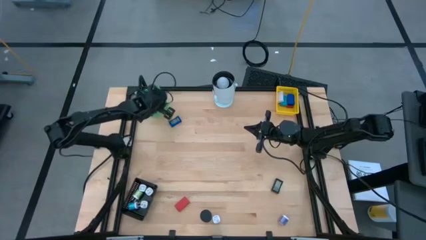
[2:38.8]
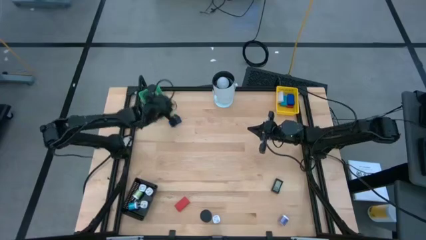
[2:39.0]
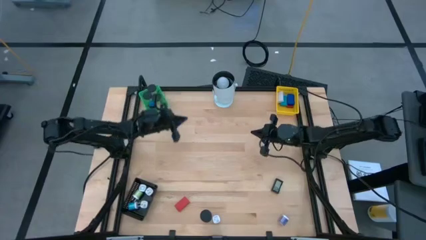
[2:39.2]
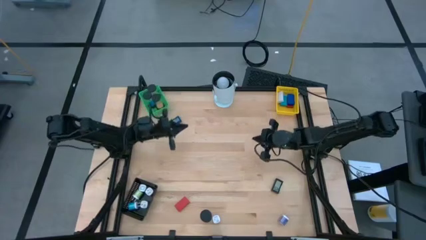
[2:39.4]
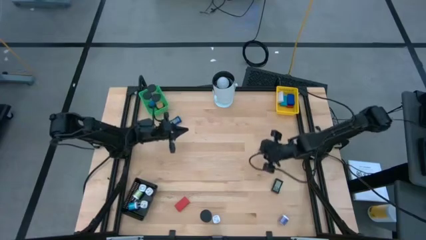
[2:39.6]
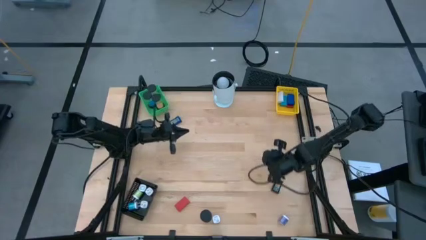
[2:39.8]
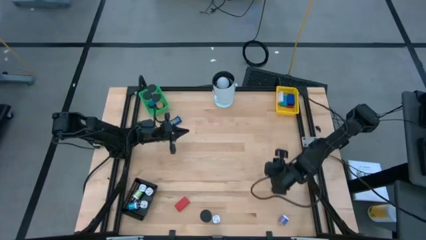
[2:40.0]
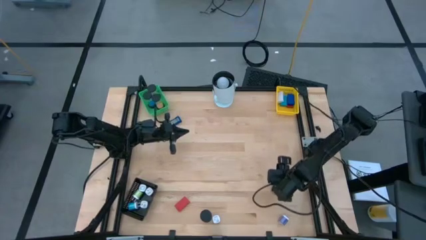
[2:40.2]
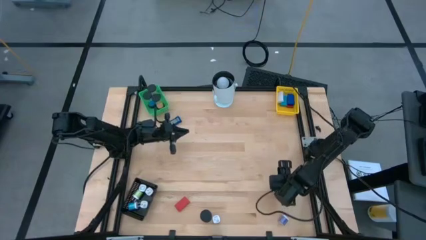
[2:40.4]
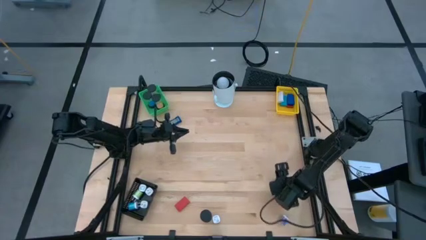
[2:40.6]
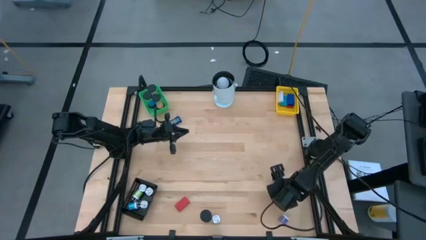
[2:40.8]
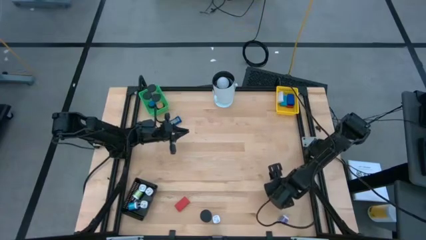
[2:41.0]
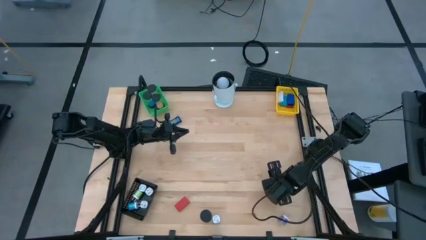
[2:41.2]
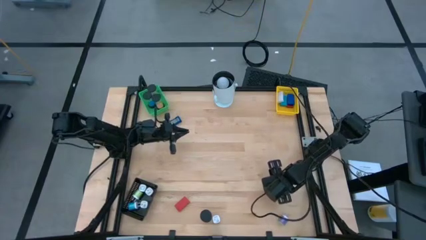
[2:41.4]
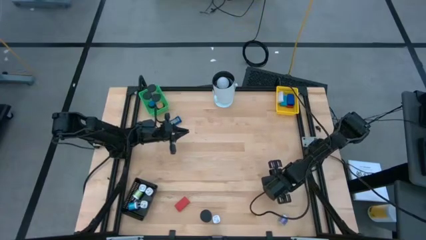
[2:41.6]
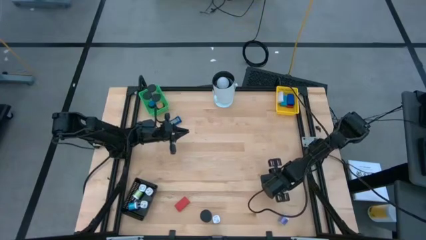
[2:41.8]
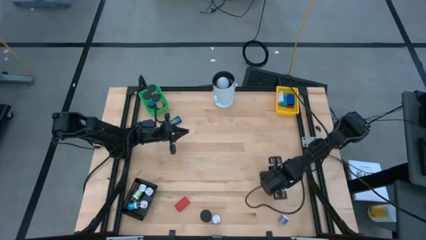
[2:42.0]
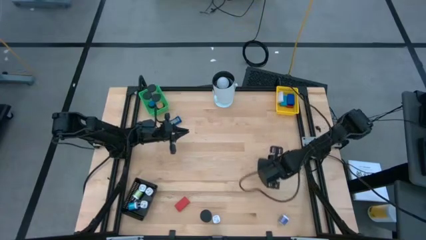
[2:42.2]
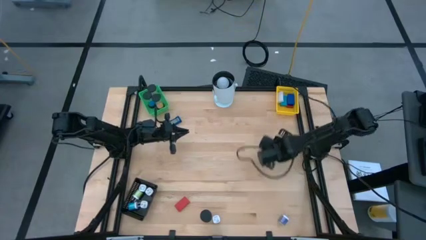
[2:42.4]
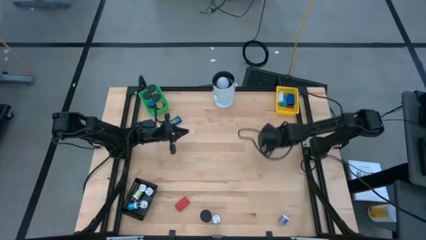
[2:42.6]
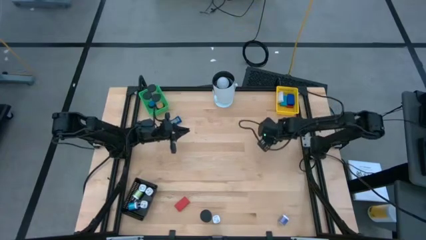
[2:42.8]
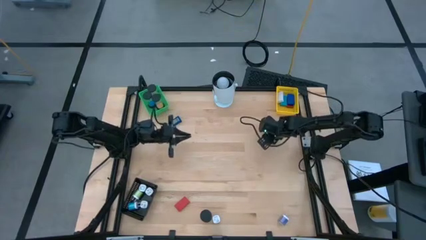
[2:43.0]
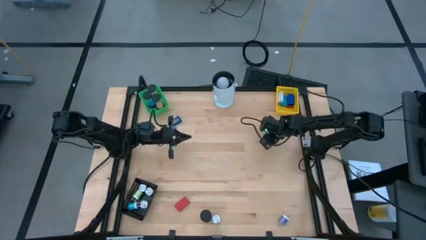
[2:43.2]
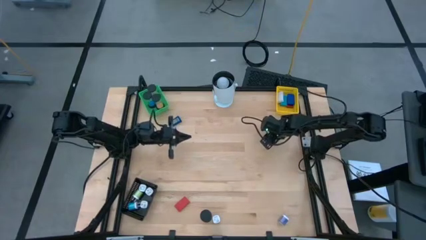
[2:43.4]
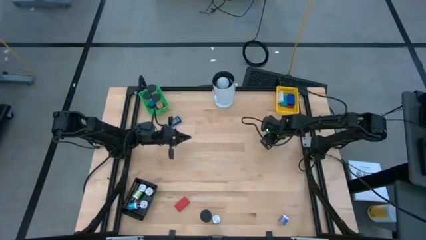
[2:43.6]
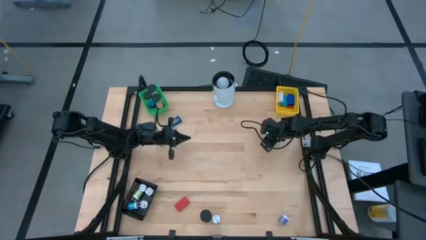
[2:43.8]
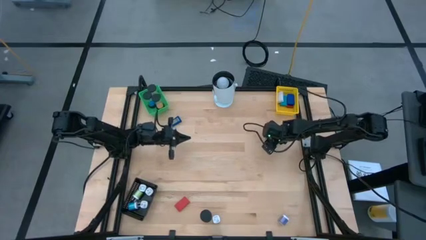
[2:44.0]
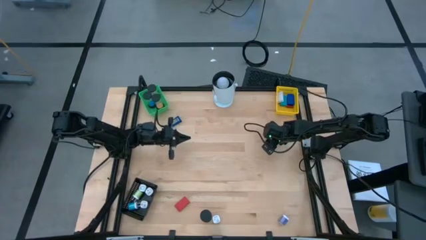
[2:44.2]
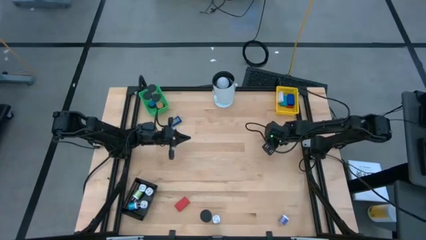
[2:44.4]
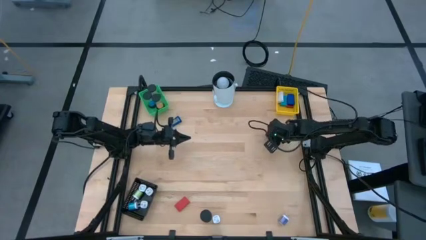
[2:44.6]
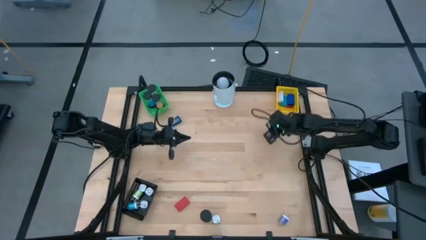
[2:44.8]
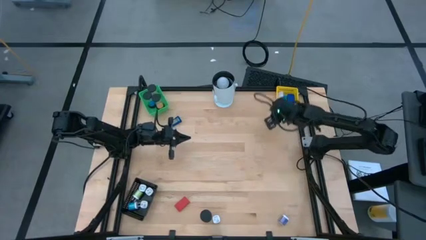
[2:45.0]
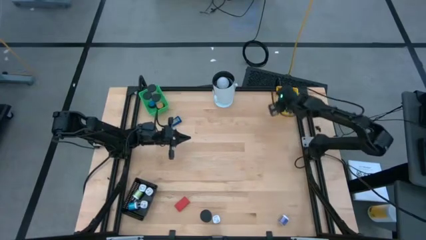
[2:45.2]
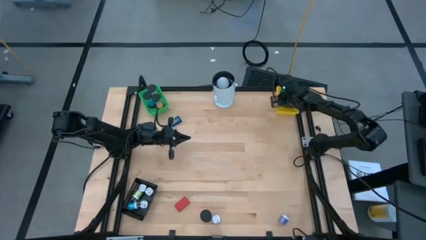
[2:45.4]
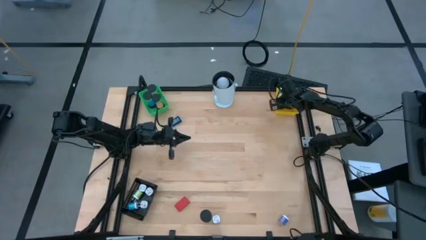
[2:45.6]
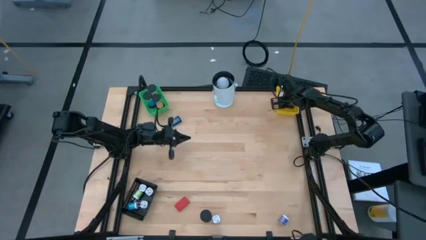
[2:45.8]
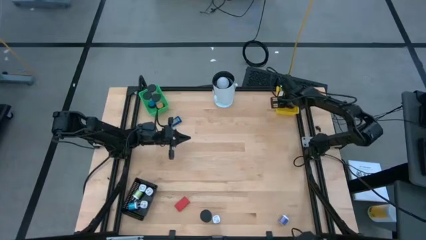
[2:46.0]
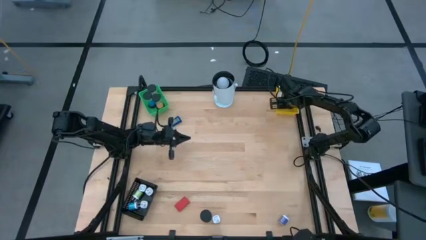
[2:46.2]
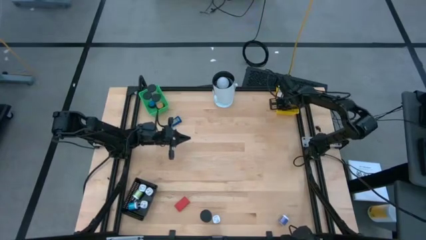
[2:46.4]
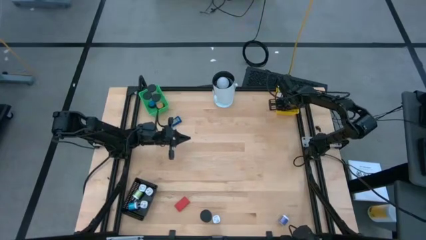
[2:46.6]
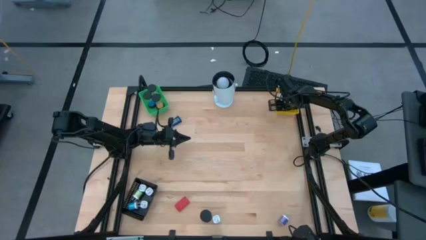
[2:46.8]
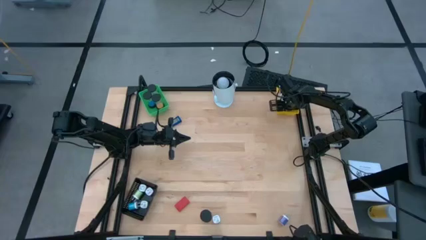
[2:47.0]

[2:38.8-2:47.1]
Task: Pick & Place Office items
Put the black digital clock into the yellow bin

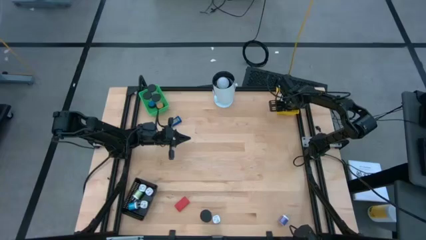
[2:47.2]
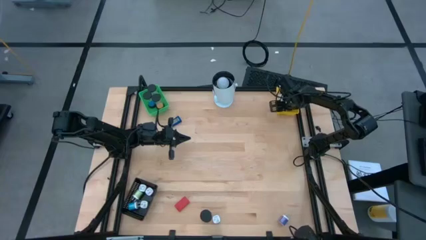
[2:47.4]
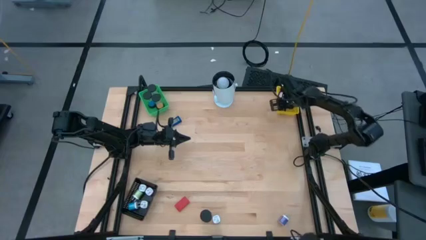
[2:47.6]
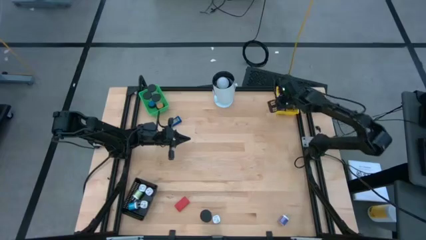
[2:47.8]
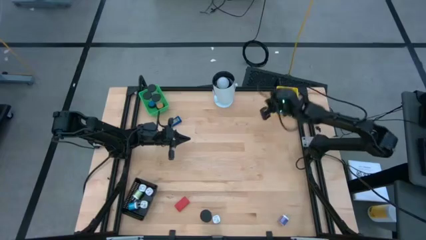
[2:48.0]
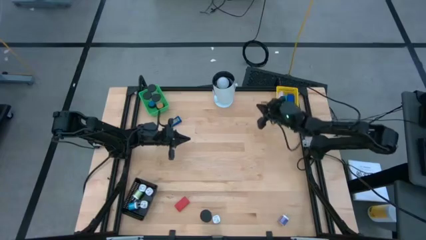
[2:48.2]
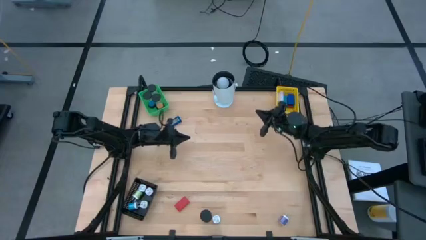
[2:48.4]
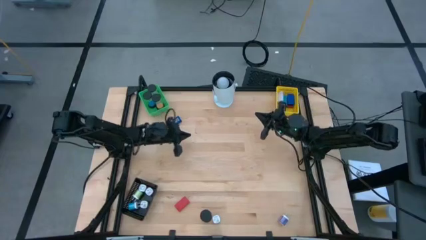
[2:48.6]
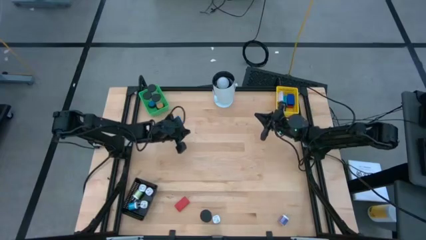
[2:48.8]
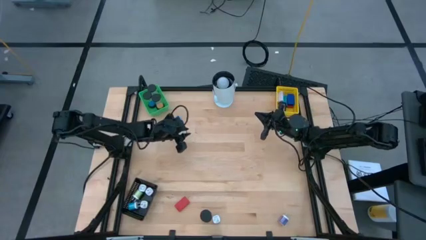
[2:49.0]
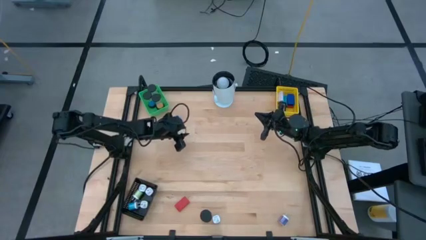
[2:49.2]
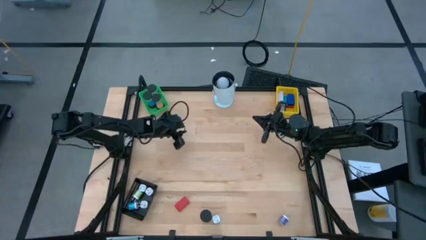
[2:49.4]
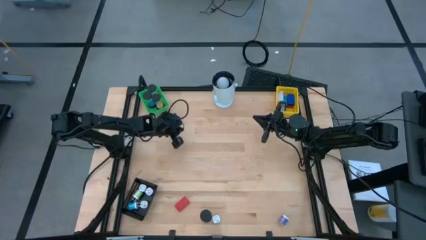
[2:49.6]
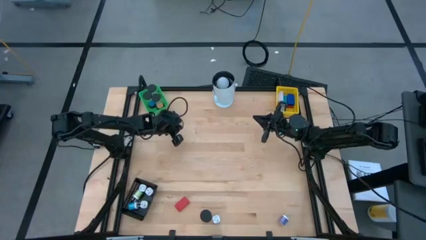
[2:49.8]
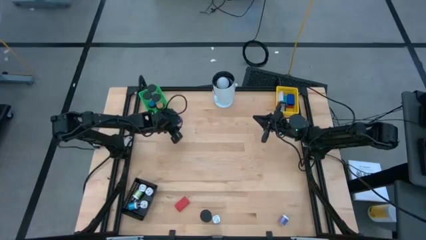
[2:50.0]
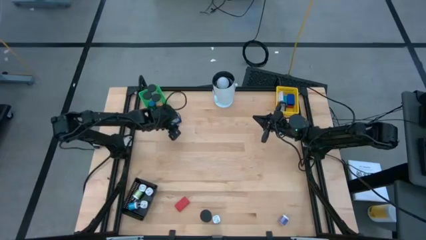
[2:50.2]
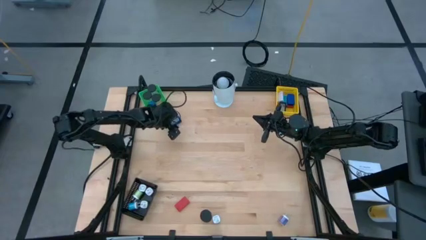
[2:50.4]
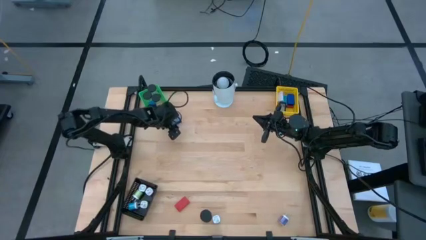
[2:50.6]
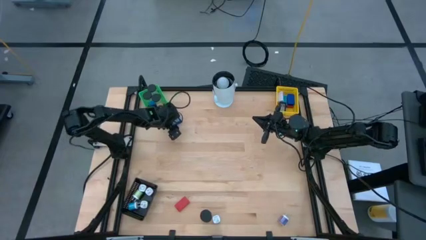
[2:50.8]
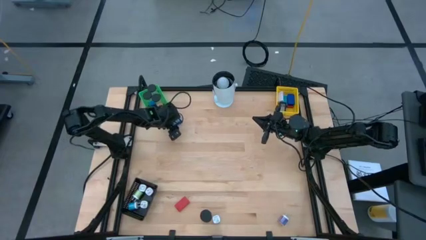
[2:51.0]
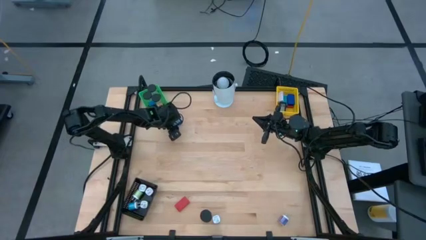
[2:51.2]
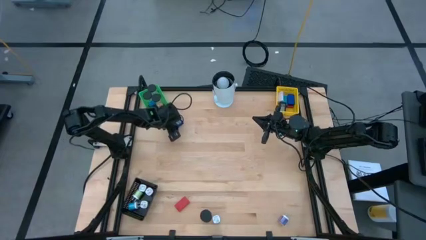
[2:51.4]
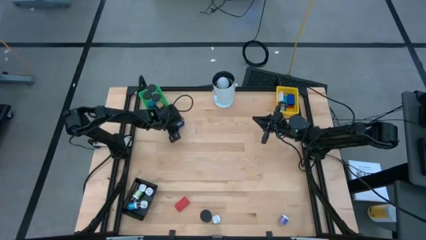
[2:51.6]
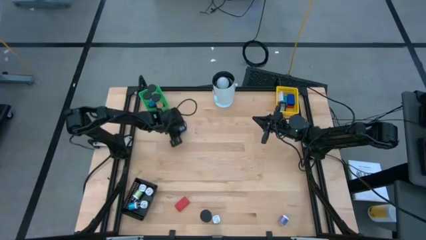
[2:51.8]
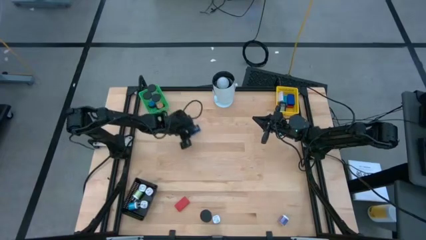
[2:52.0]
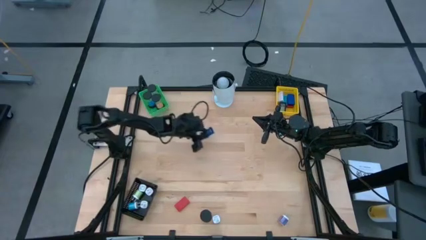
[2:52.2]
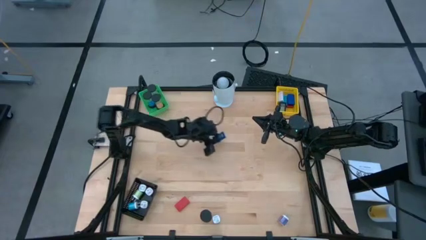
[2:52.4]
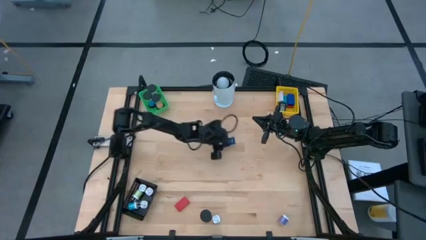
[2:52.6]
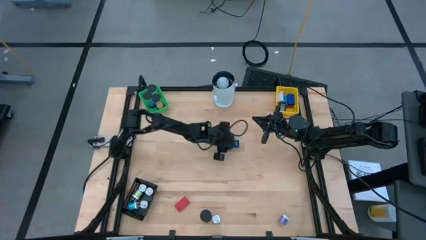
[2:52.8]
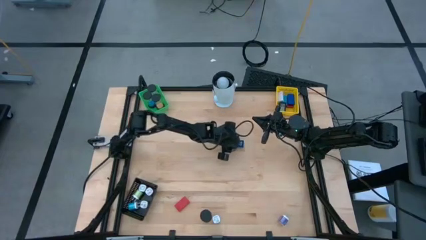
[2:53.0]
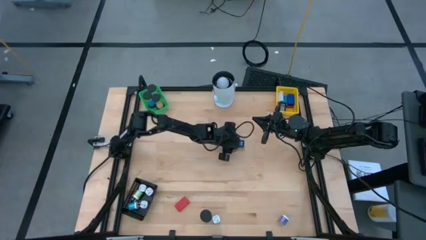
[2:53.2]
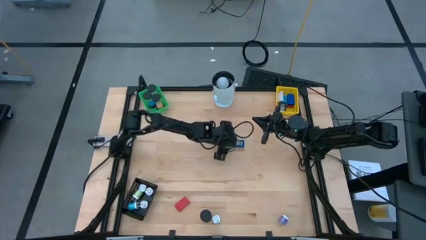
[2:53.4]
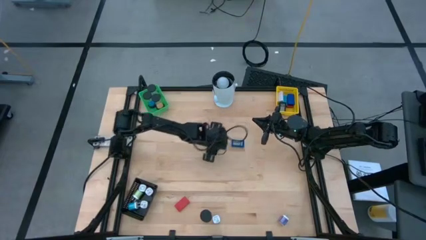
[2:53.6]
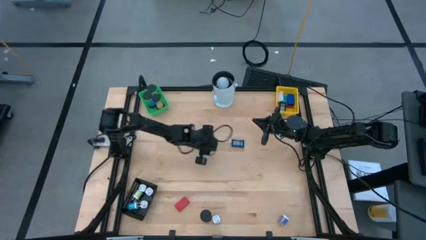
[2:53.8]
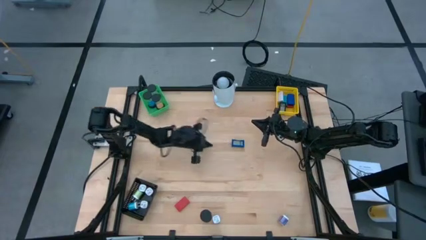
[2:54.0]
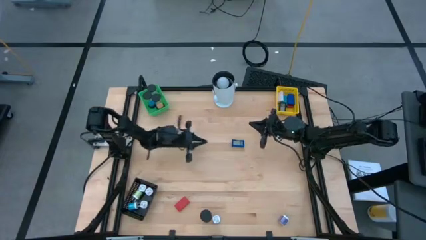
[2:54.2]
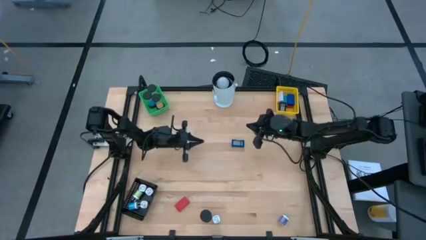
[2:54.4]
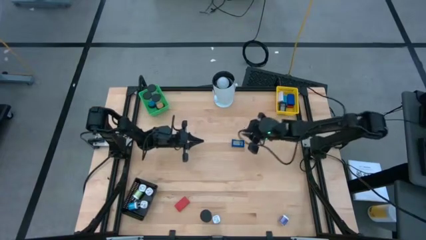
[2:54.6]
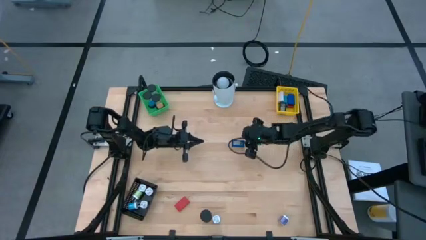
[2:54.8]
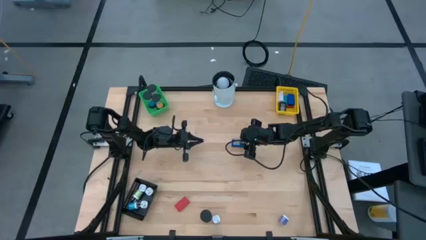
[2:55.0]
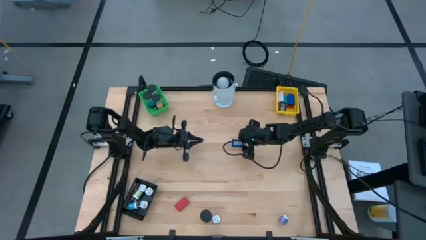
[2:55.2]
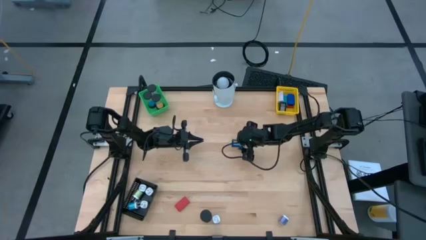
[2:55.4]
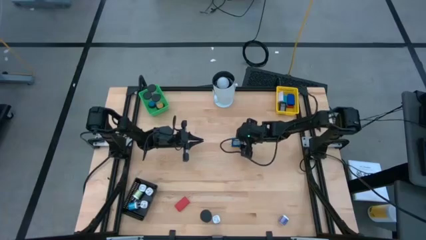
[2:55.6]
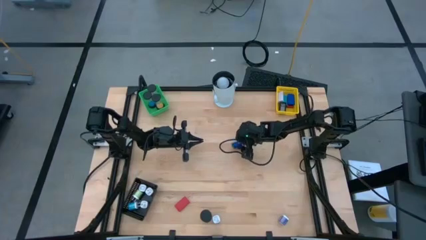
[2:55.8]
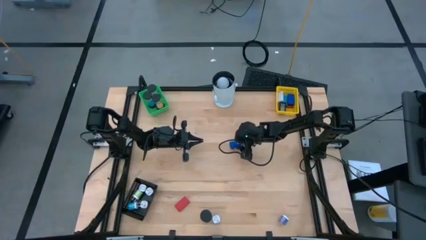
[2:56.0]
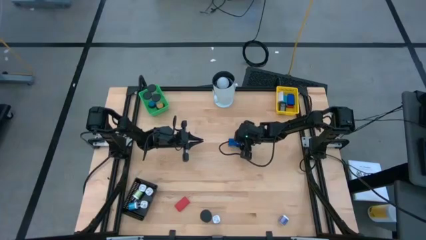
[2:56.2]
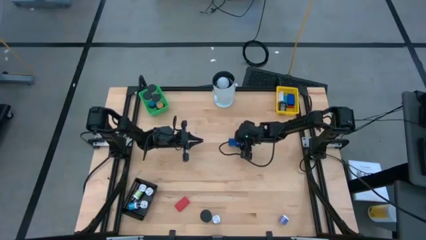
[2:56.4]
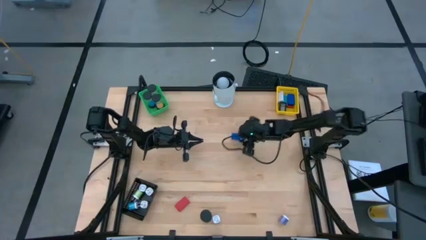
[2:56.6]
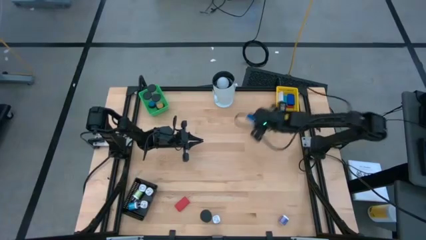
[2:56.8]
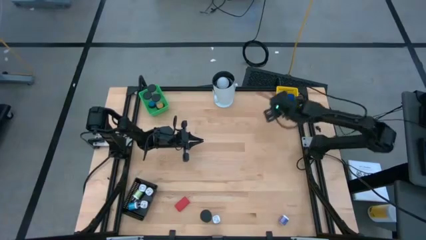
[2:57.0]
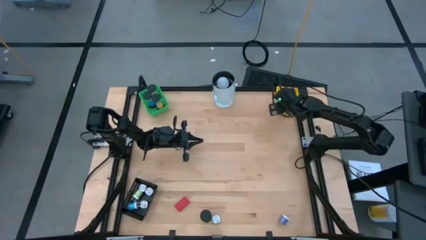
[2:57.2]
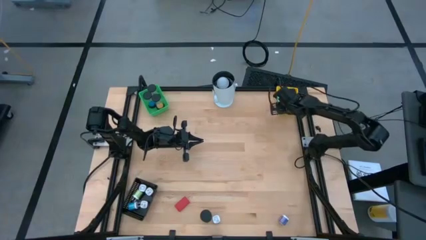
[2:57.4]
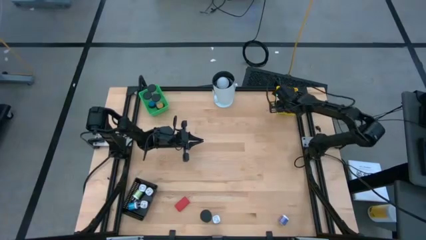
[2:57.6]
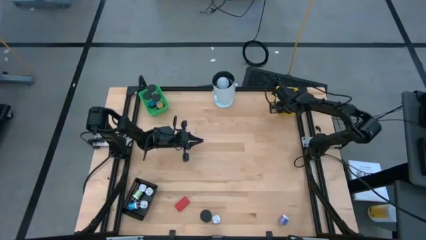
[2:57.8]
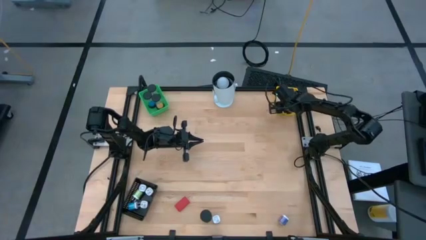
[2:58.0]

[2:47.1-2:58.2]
Put the blue digital clock into the yellow bin
